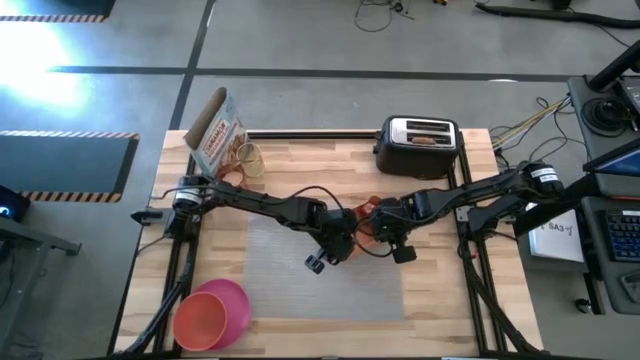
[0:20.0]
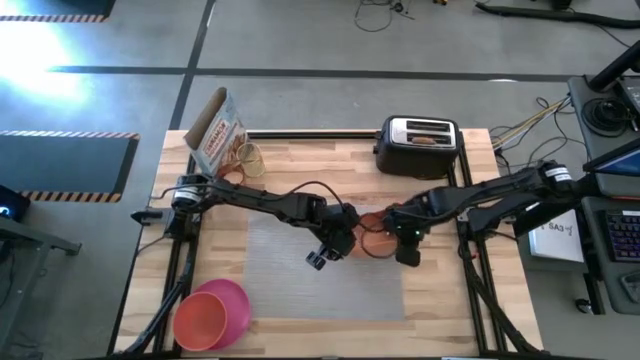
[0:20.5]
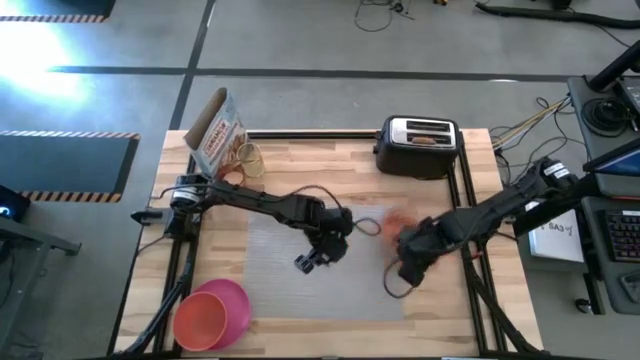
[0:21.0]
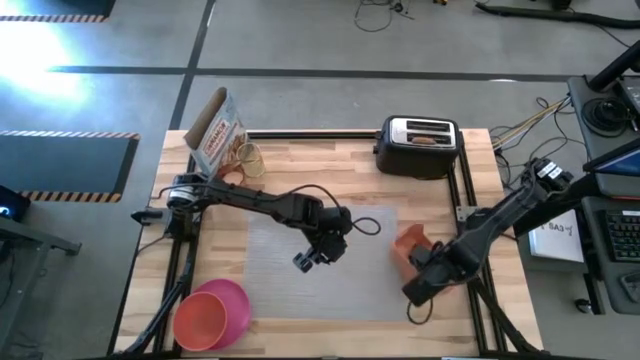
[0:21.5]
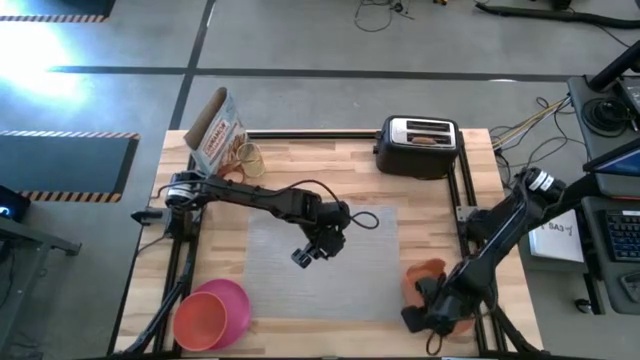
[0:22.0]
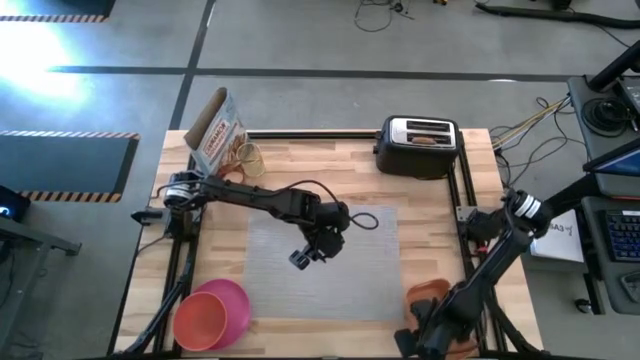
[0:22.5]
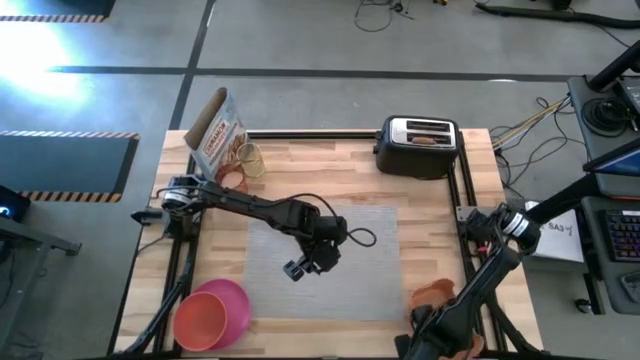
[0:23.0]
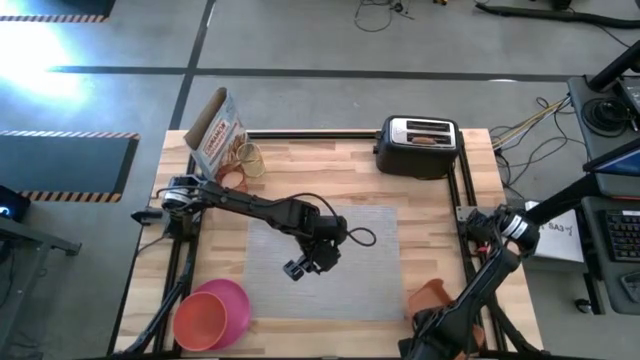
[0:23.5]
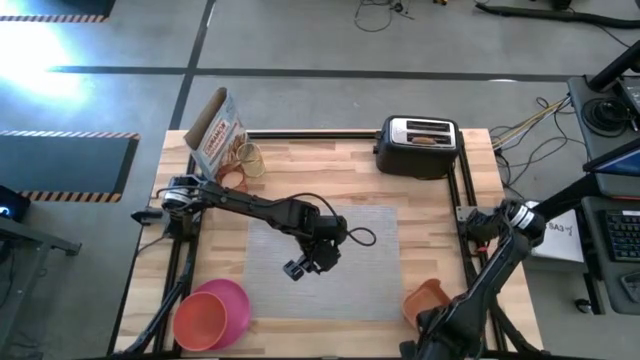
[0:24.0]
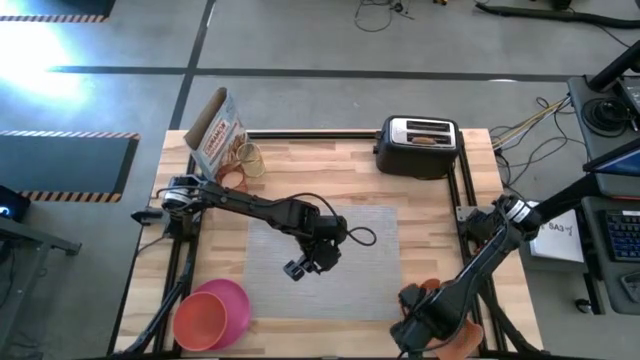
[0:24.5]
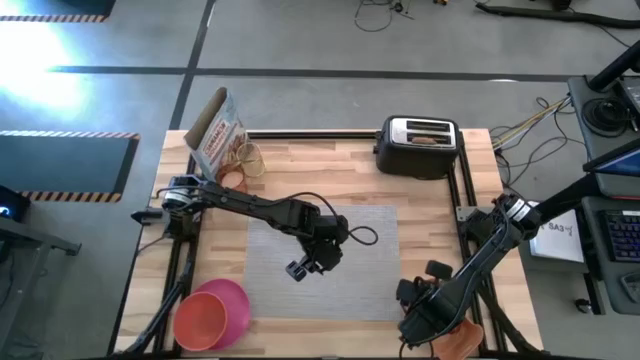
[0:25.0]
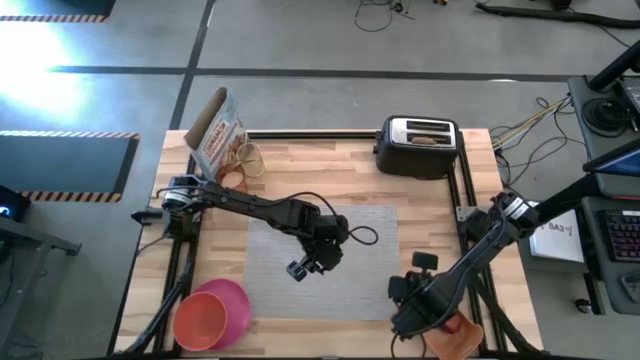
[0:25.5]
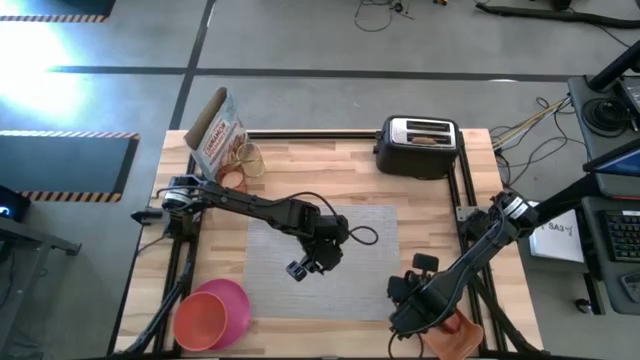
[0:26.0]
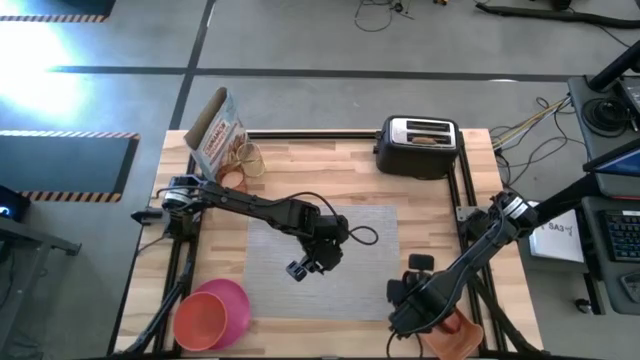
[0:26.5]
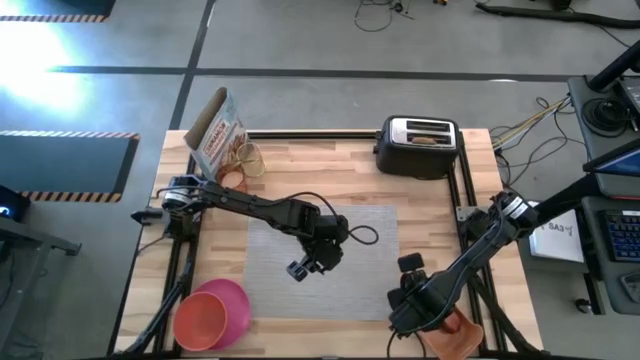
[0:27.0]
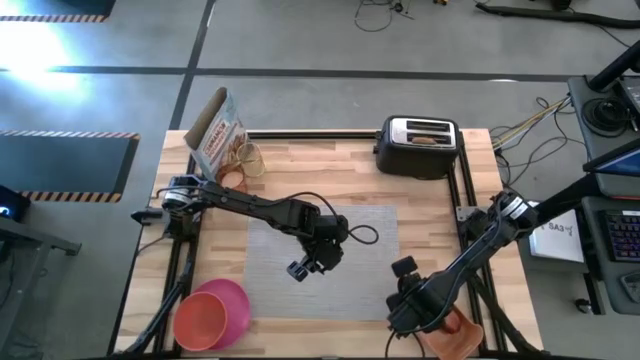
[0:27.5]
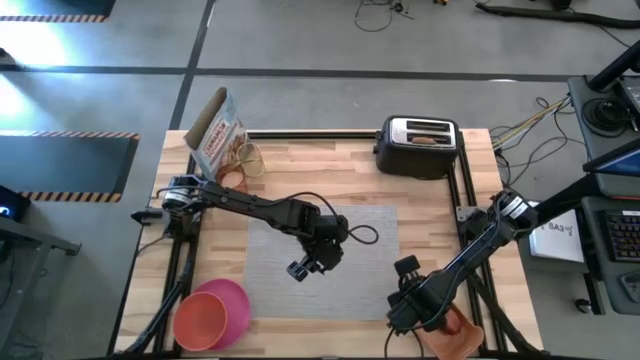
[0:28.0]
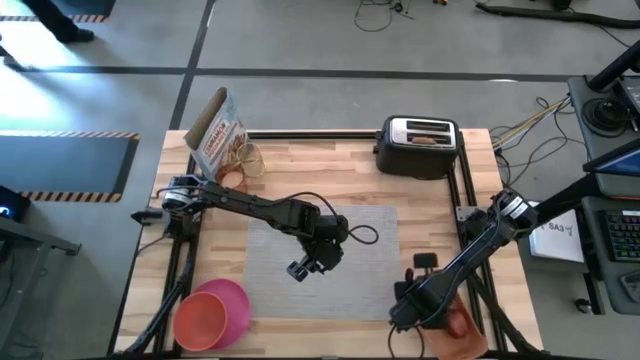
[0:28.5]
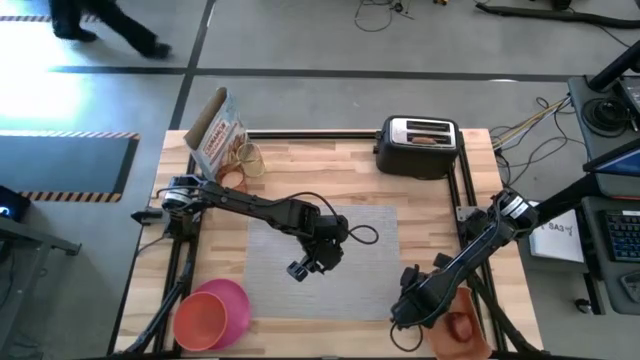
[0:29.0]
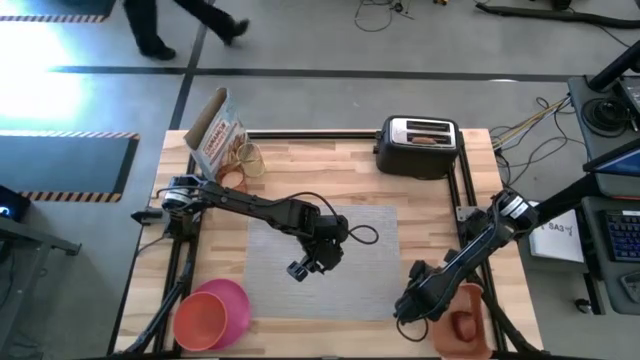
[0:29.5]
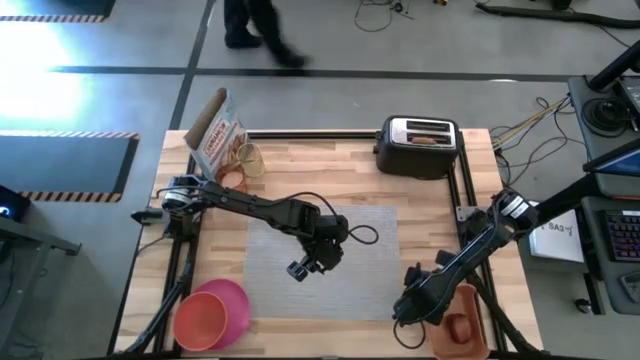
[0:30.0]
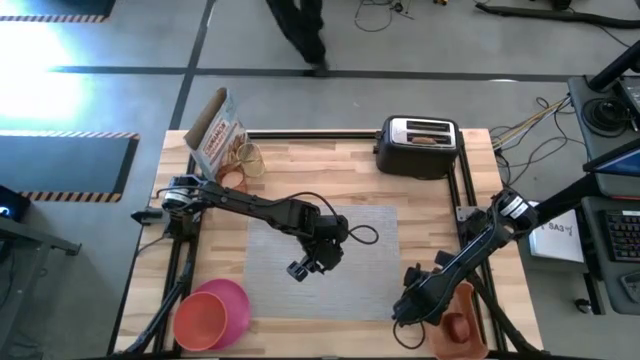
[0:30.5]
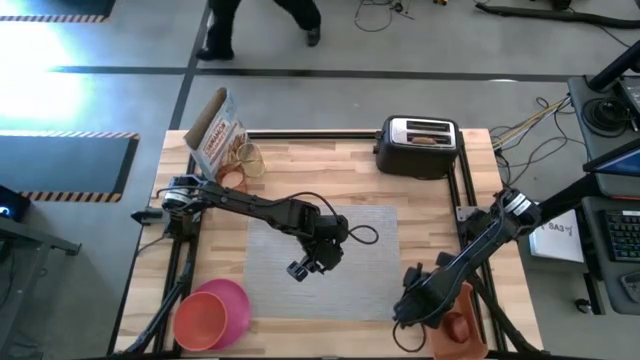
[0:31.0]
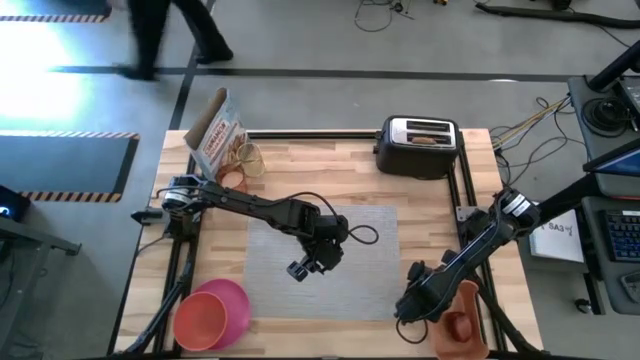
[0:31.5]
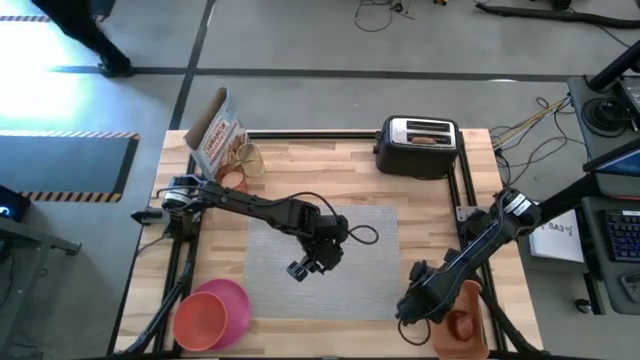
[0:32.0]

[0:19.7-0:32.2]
Task: Arrange a breakfast setting
Move the orange bin to the bottom right of the table

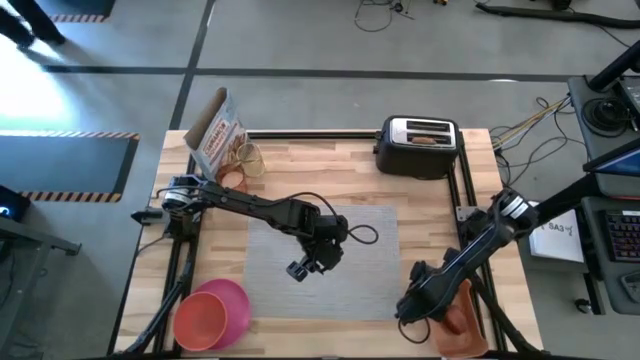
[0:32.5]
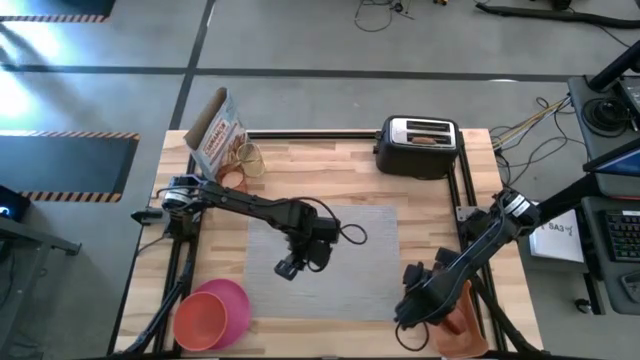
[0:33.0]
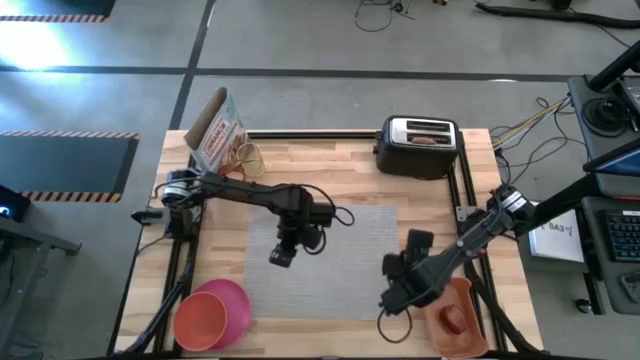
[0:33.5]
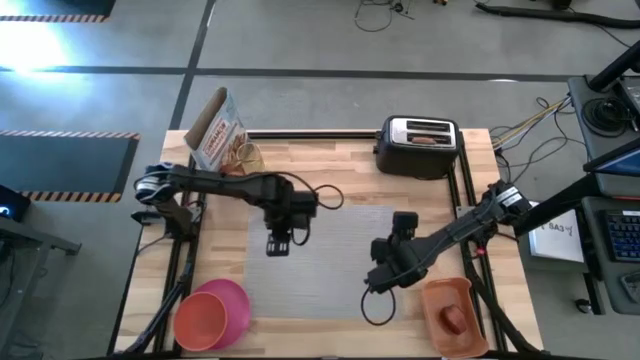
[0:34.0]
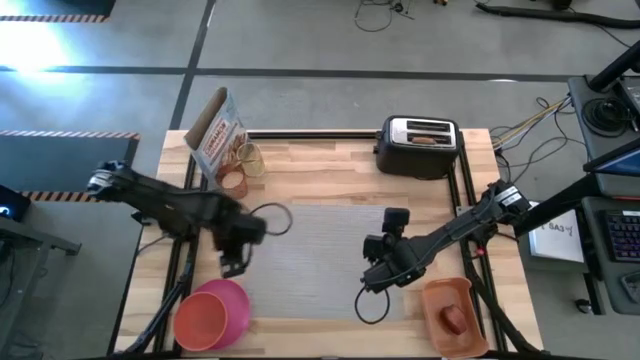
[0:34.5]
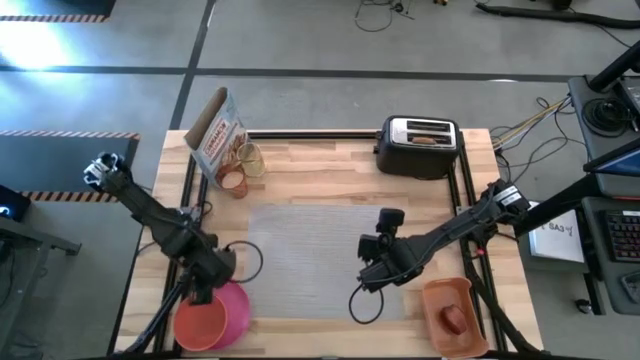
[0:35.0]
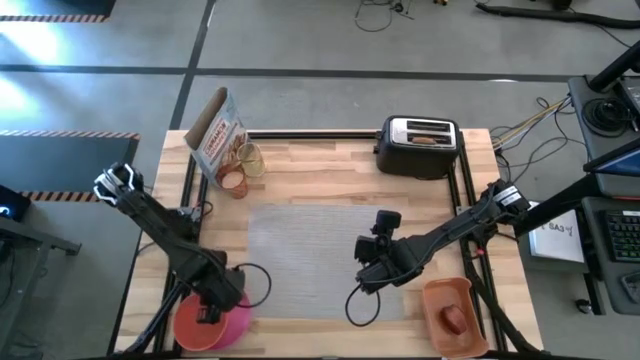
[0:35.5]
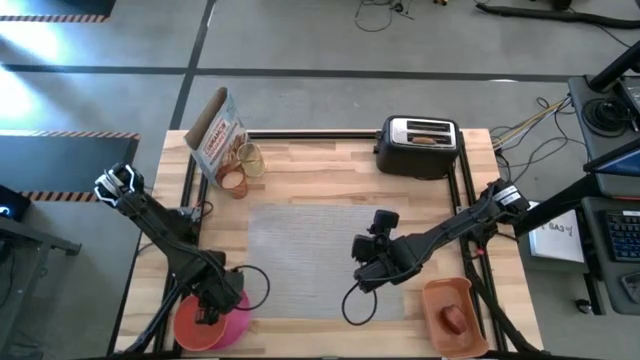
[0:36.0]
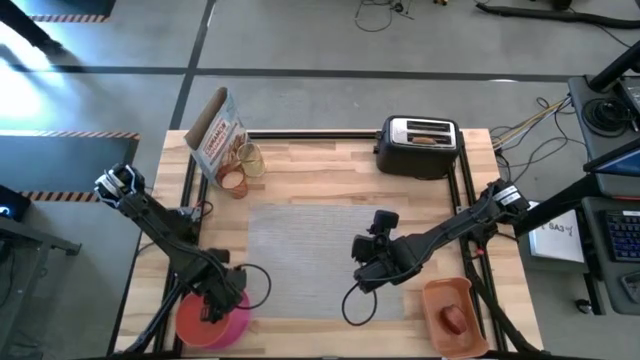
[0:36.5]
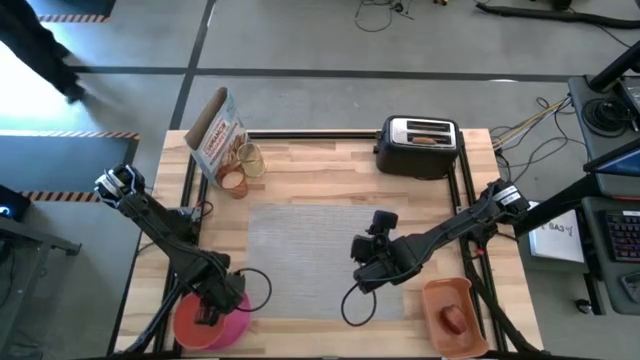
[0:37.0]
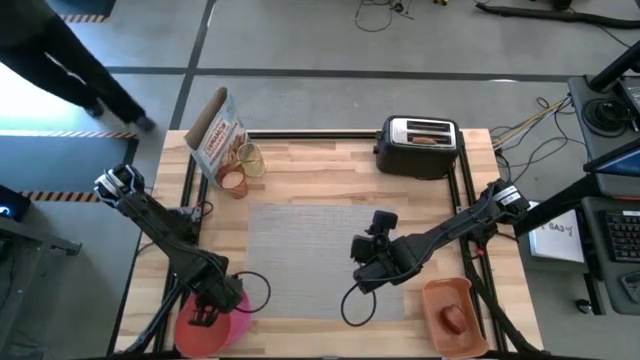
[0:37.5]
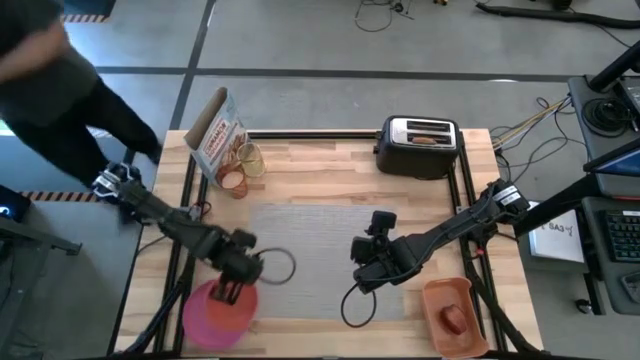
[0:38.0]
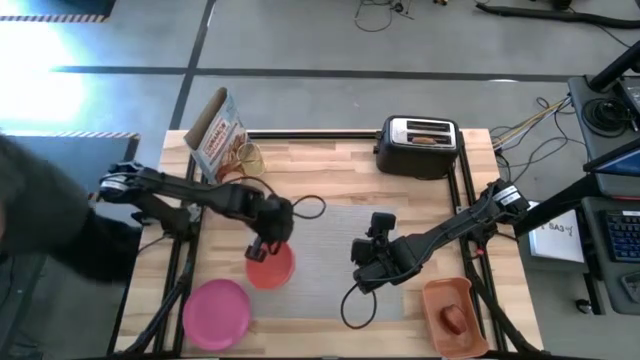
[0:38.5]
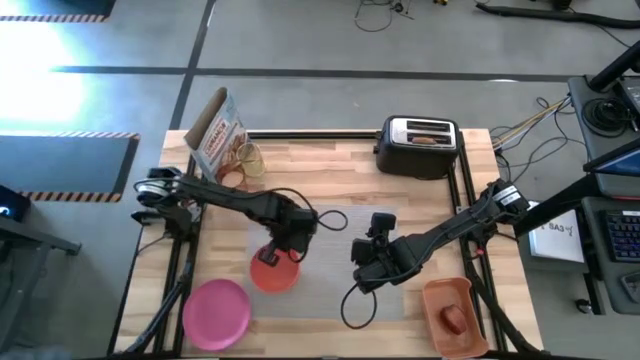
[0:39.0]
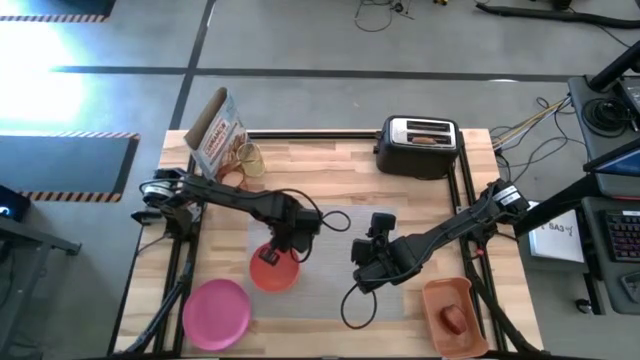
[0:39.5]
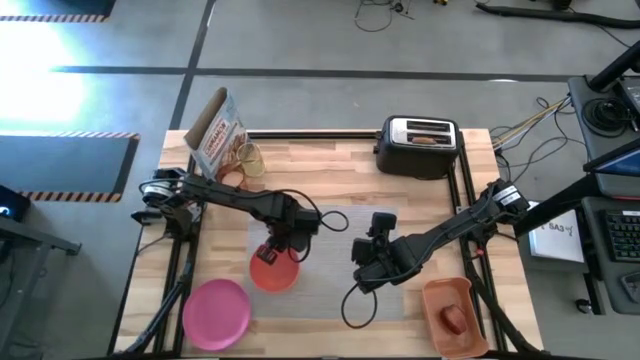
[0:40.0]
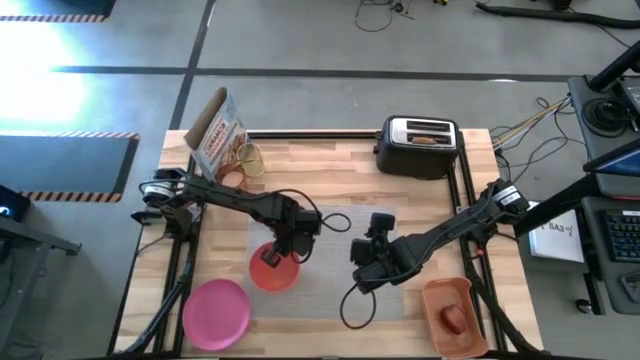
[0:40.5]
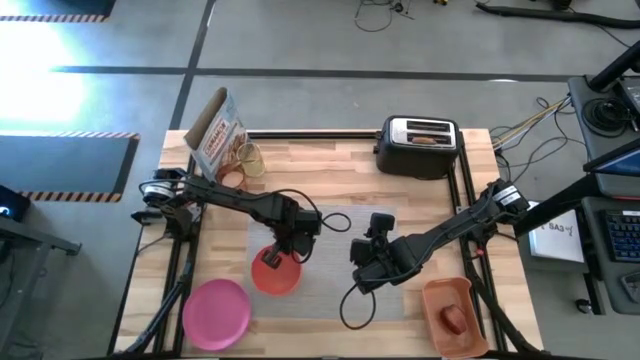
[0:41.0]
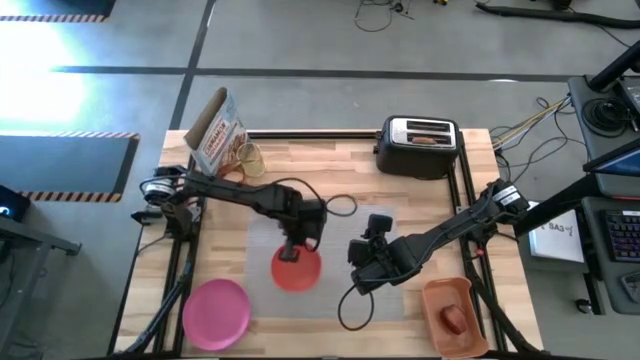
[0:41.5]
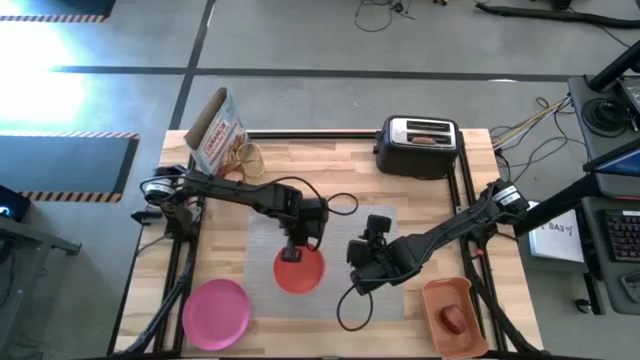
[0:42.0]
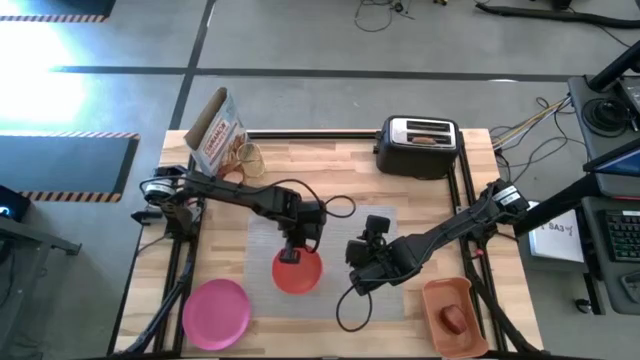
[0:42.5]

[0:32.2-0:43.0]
Put the orange bowl on the gray mat
